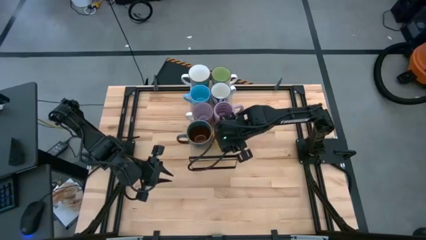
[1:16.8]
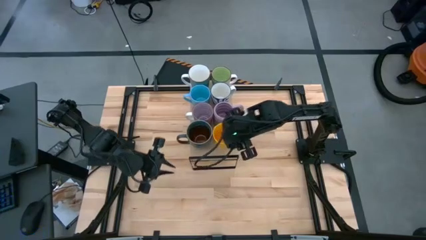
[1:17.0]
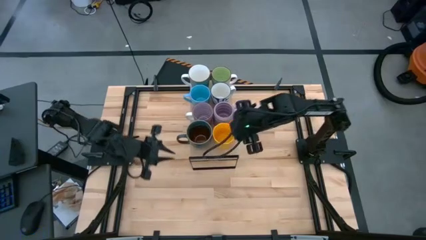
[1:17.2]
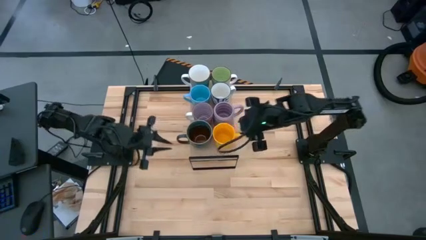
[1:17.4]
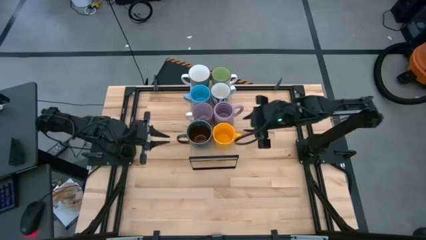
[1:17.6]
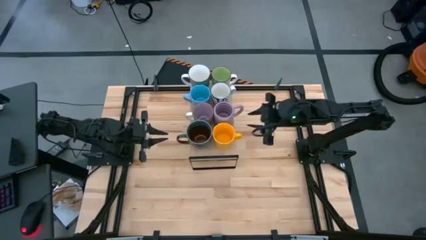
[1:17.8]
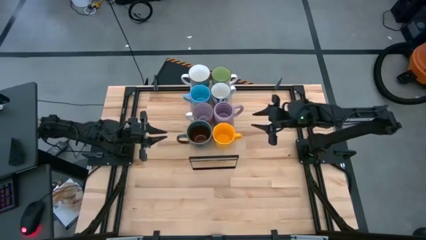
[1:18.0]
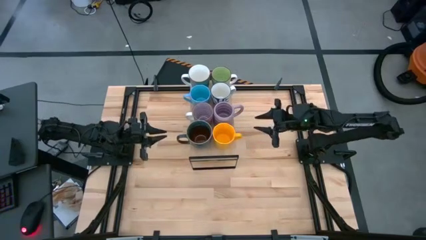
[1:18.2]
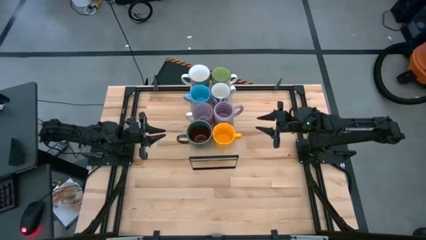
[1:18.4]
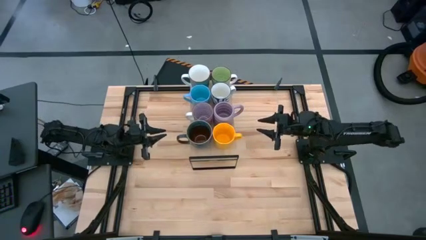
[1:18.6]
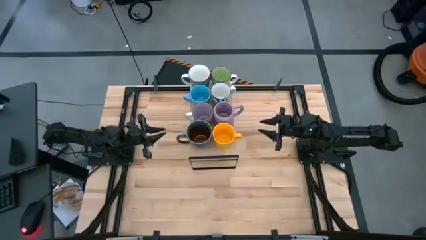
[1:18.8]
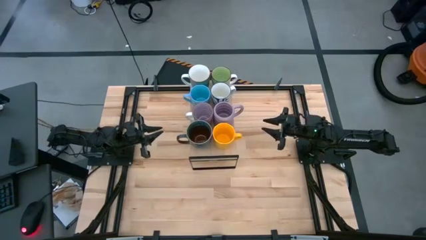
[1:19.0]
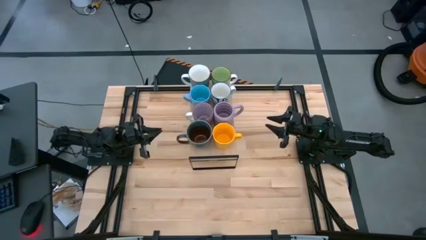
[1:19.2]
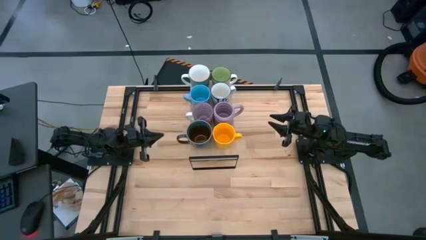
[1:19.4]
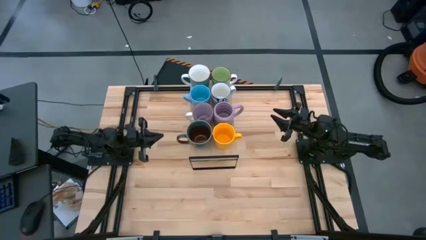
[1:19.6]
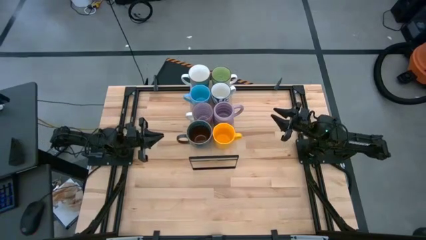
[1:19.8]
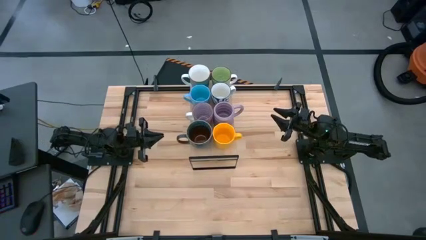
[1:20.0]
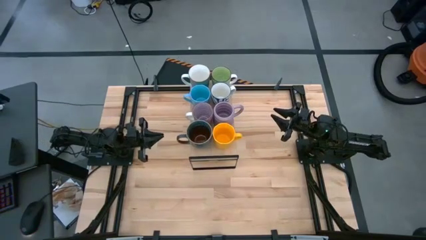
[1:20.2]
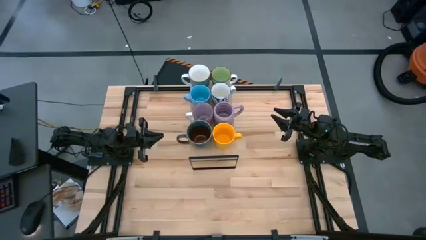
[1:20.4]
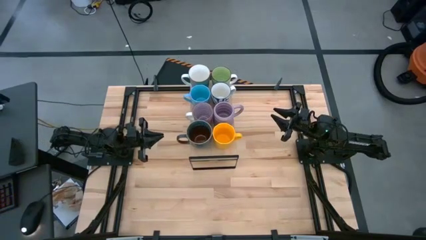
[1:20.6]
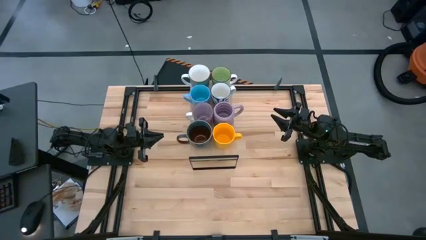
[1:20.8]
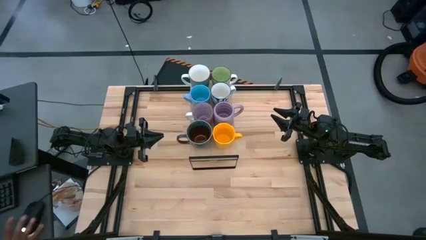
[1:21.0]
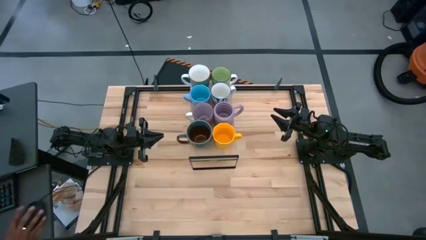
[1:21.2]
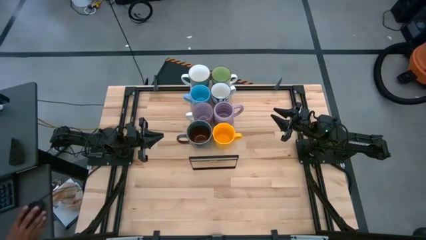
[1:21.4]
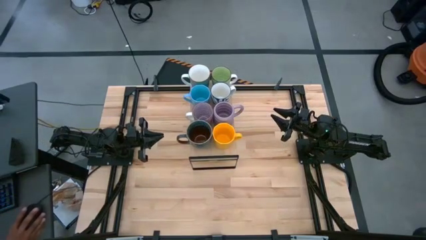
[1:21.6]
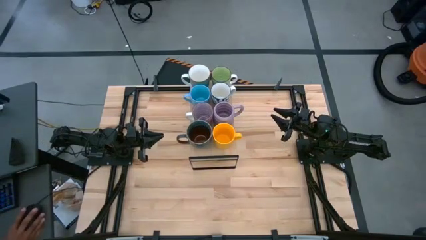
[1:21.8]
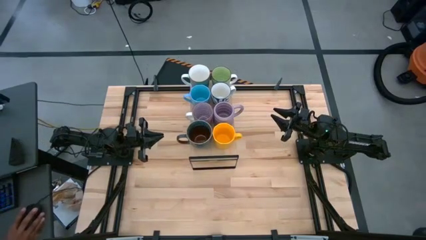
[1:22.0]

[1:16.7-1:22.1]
Task: Place coffee mugs
Return to Home Position

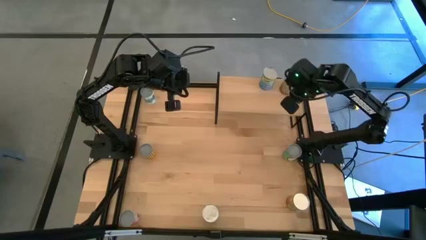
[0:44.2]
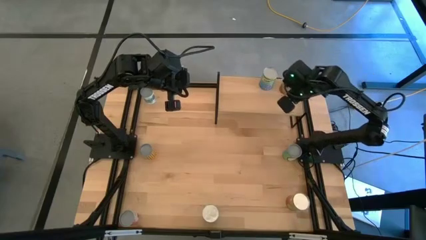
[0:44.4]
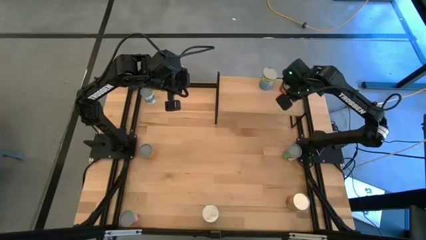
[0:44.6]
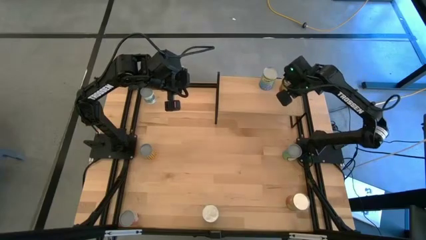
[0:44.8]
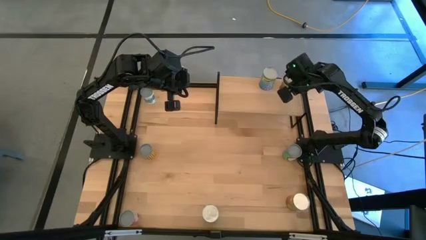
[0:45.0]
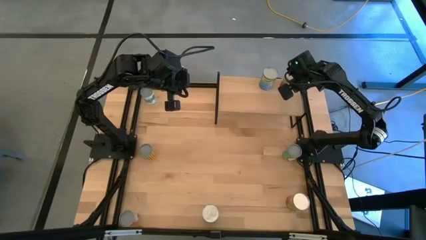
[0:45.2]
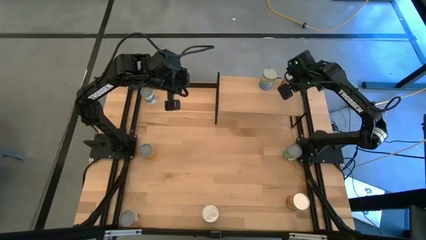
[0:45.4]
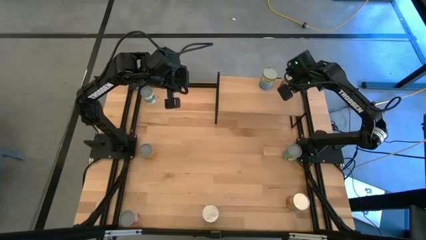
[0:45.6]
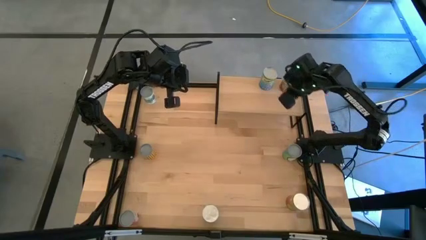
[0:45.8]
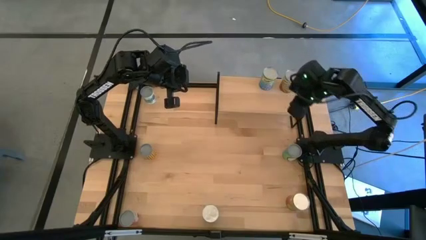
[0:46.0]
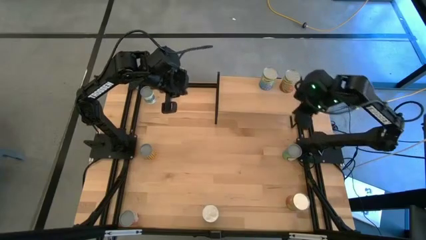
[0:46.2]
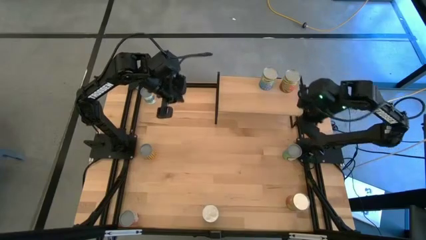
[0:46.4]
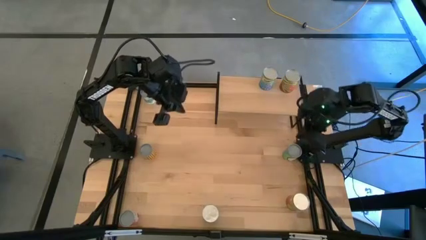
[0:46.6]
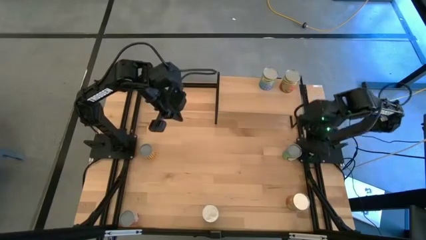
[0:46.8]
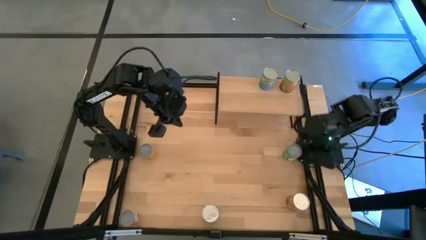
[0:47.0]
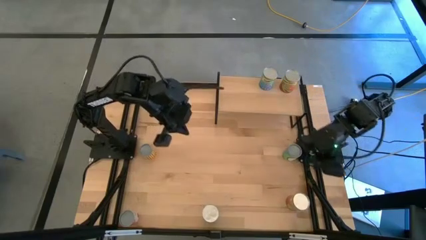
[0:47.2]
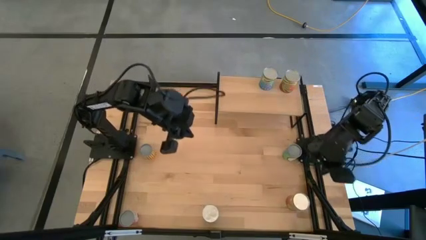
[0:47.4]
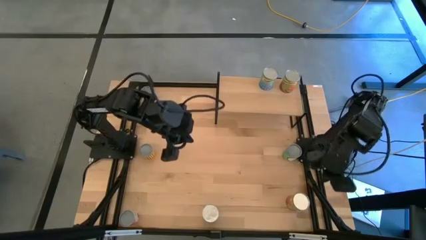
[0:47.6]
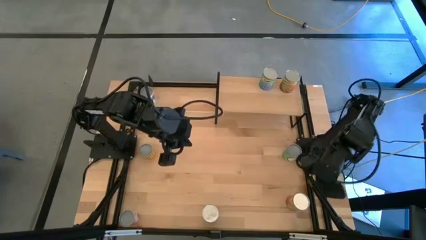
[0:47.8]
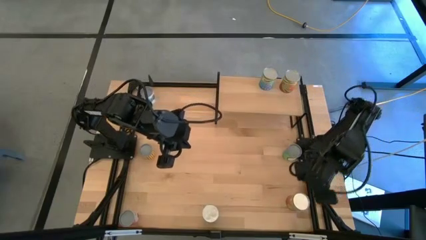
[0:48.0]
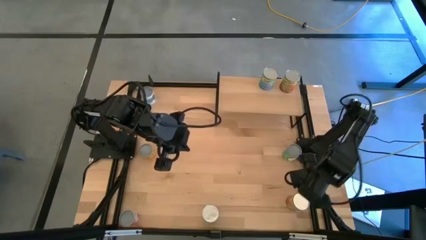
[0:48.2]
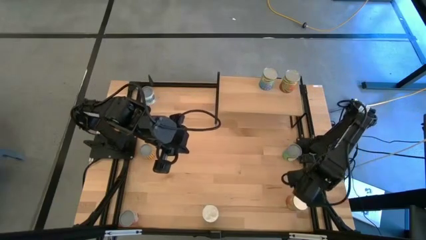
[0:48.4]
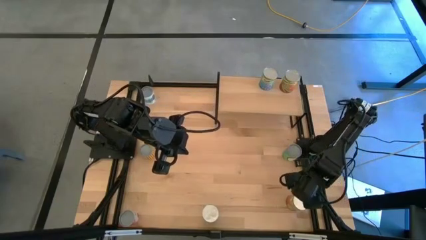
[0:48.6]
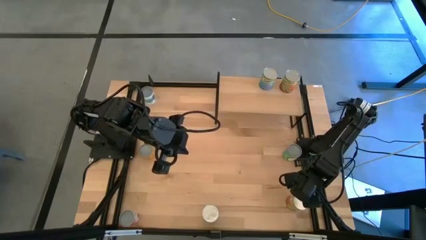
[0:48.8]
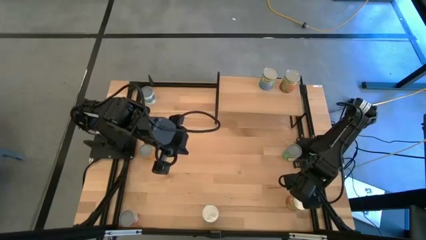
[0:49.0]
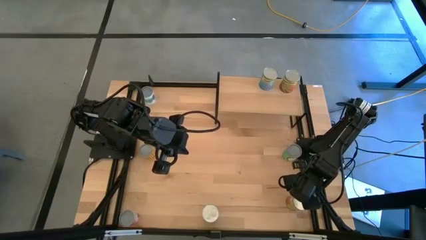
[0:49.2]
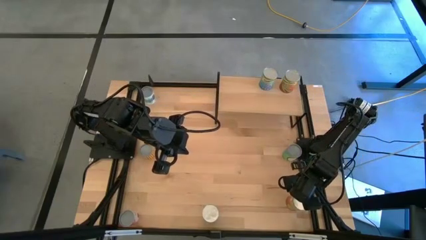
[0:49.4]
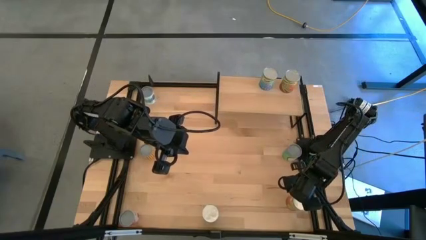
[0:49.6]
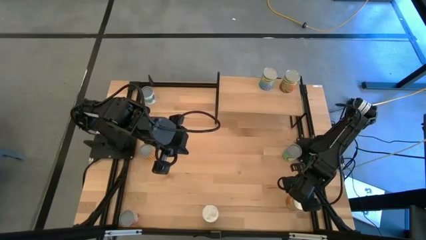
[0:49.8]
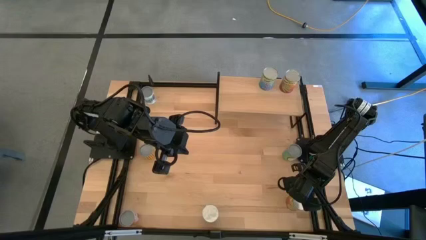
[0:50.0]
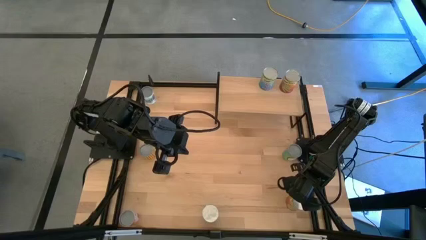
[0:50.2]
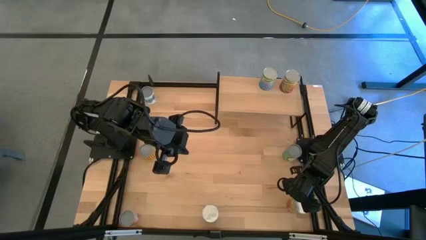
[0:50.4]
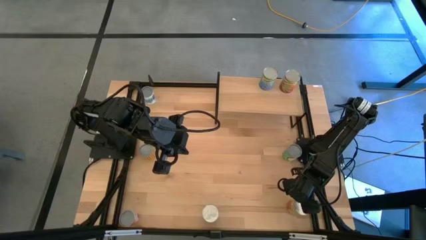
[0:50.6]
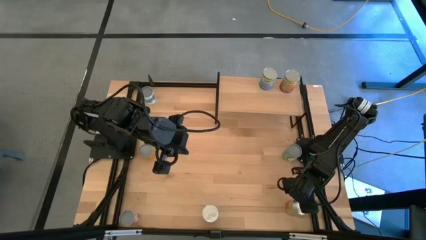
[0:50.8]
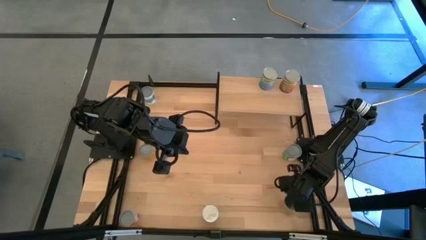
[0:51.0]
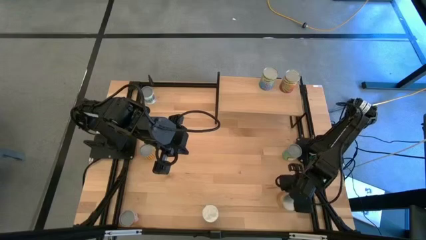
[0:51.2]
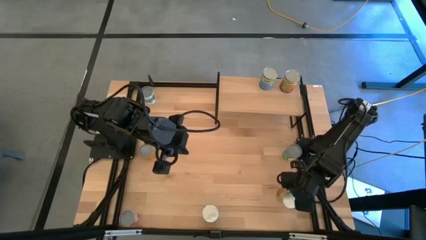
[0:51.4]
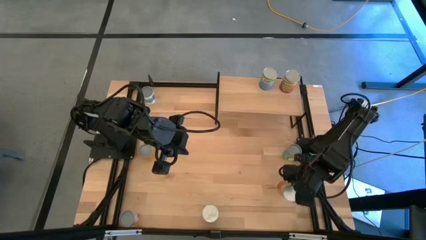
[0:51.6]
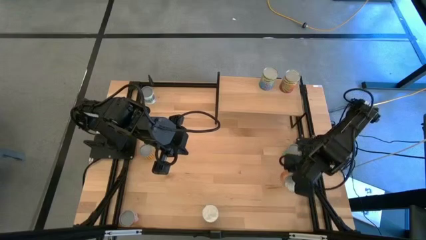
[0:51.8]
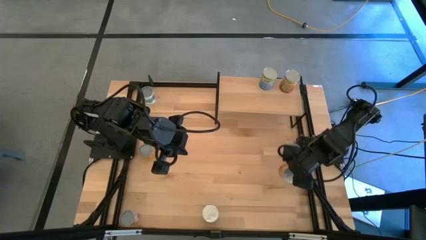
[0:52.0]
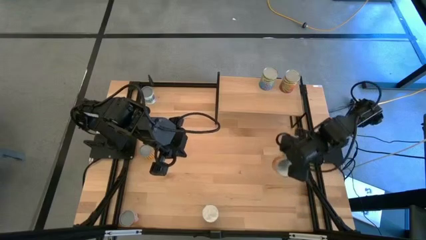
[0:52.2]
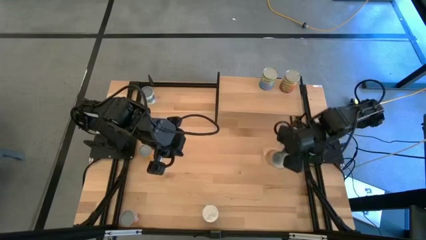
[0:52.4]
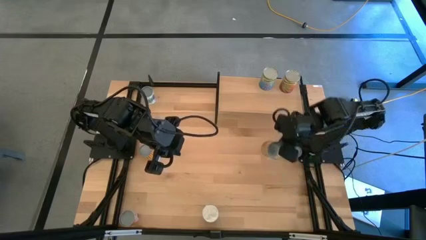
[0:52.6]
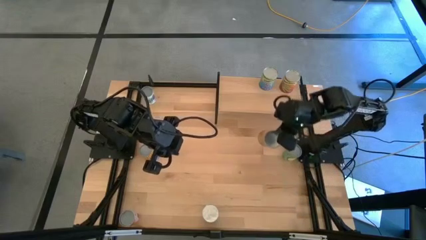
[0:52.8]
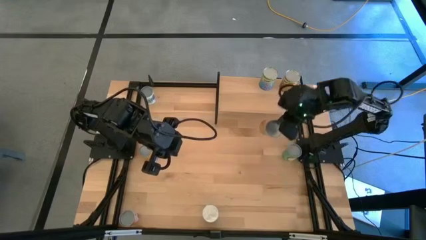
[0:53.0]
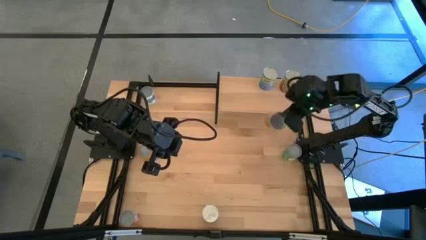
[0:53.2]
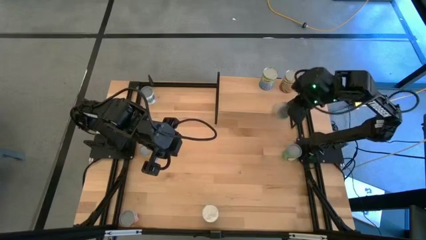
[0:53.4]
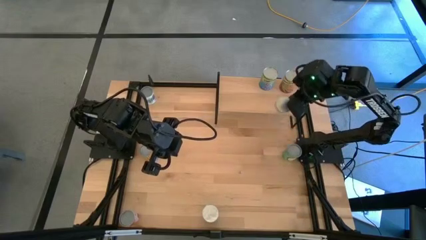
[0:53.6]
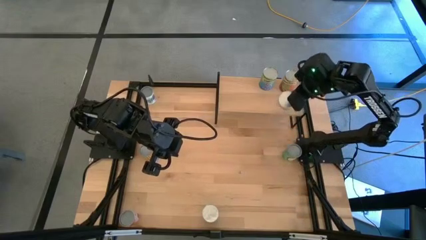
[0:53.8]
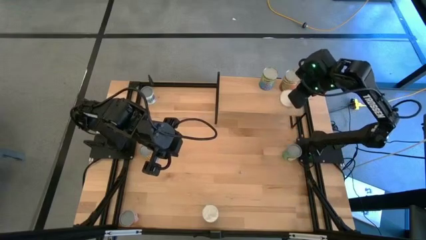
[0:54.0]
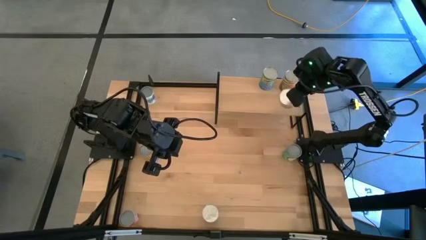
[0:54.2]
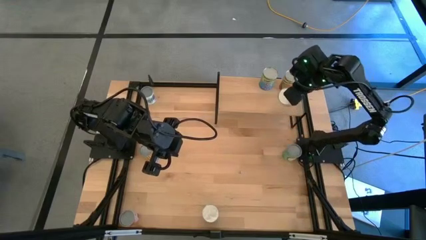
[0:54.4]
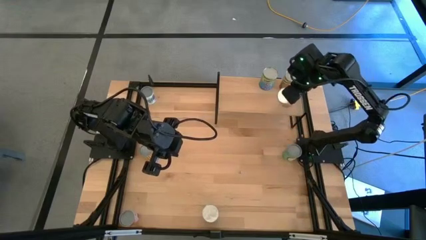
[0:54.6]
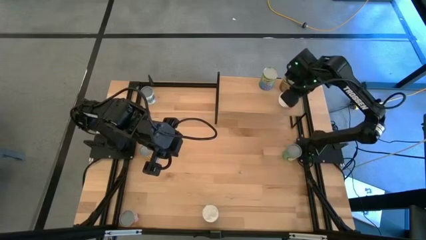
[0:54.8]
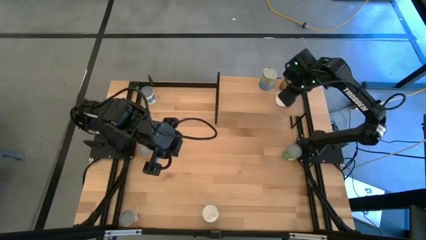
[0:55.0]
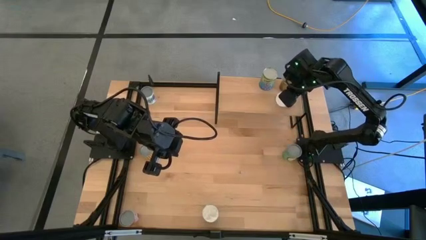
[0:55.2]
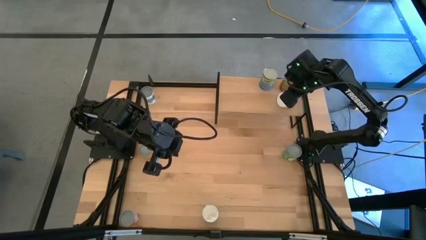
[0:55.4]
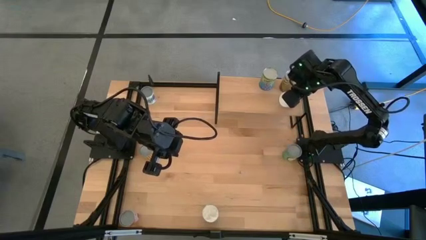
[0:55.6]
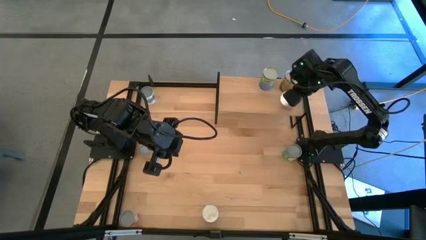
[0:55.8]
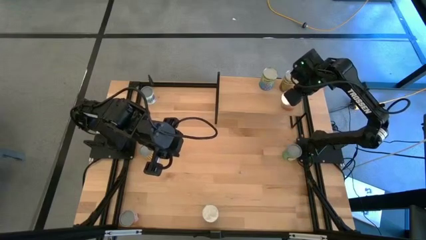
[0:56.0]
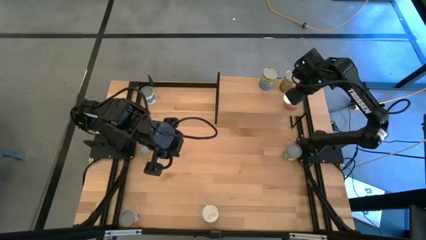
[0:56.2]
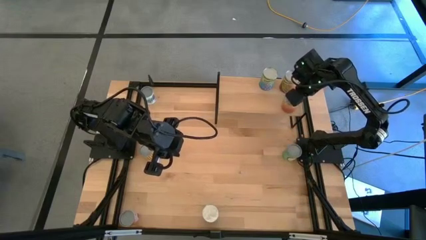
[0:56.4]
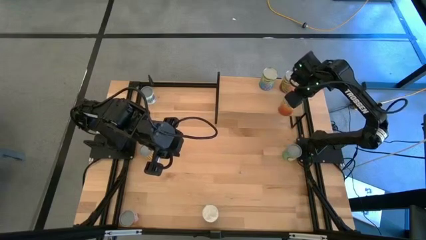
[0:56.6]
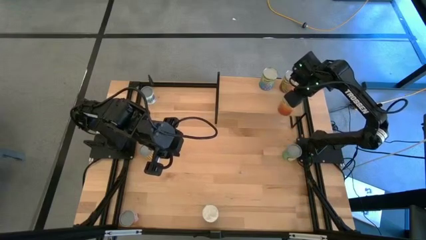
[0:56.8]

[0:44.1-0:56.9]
Task: Pick and place cans onto a shelf
Put the orange canned good on the shelf
